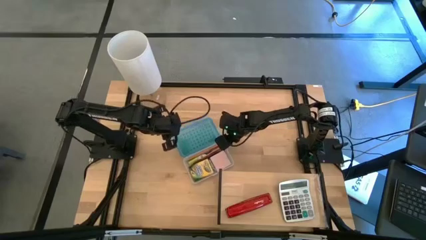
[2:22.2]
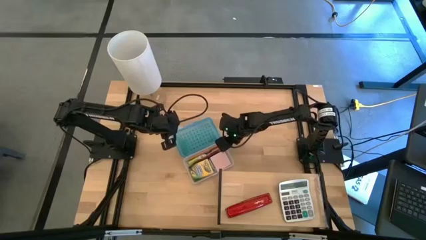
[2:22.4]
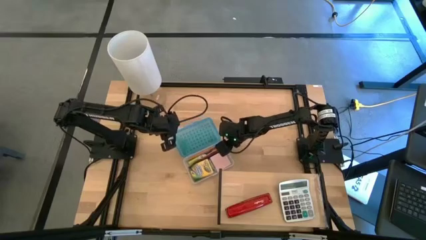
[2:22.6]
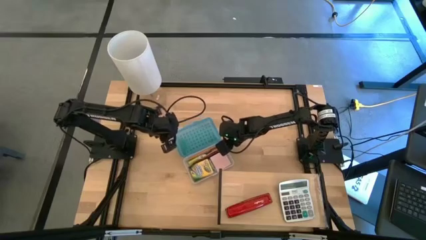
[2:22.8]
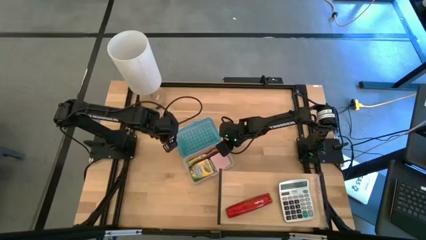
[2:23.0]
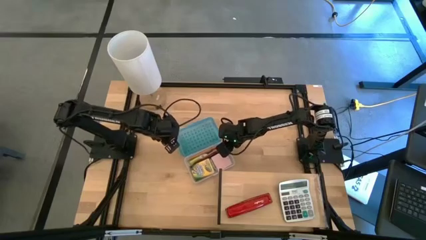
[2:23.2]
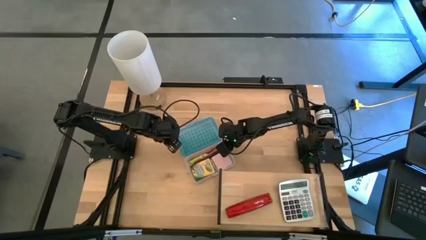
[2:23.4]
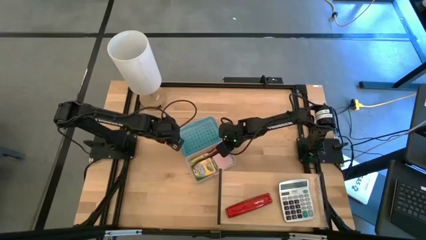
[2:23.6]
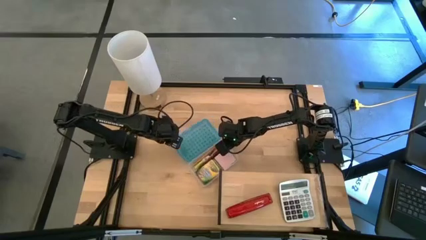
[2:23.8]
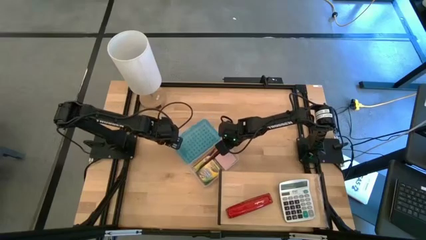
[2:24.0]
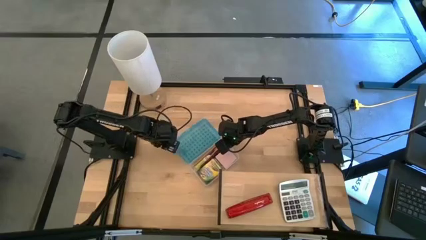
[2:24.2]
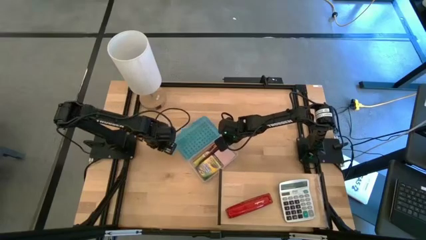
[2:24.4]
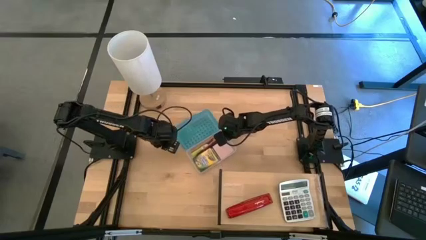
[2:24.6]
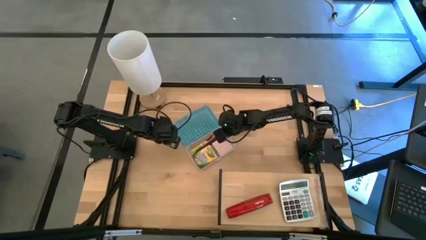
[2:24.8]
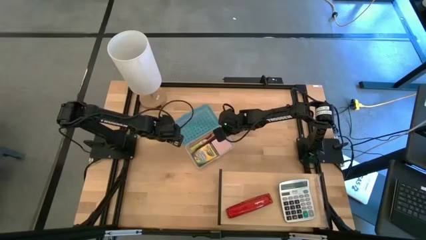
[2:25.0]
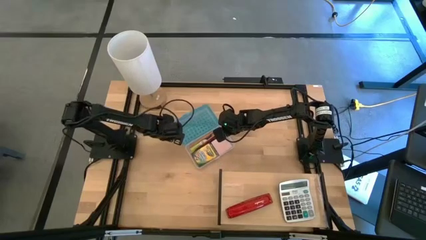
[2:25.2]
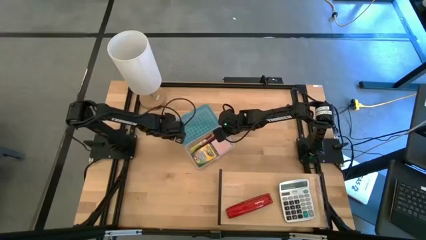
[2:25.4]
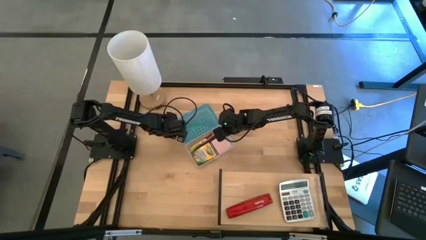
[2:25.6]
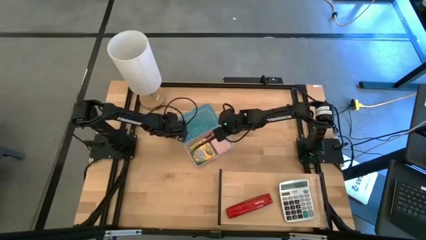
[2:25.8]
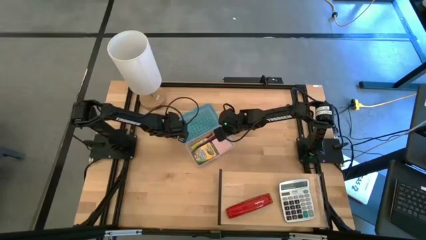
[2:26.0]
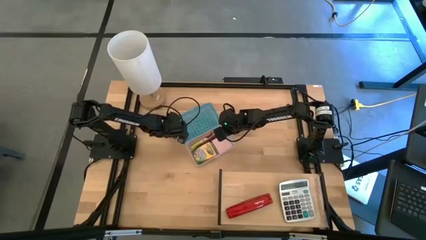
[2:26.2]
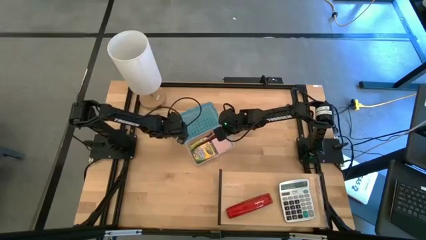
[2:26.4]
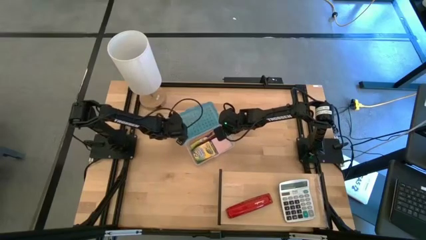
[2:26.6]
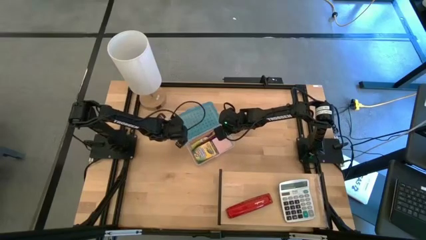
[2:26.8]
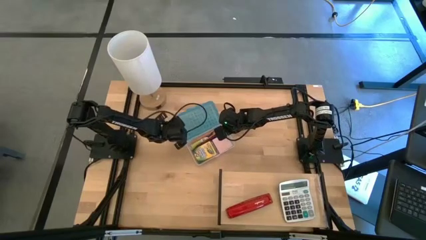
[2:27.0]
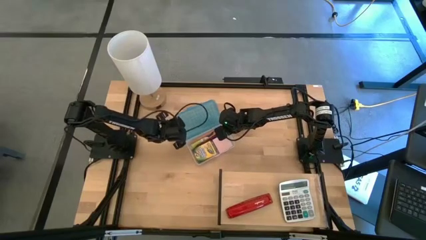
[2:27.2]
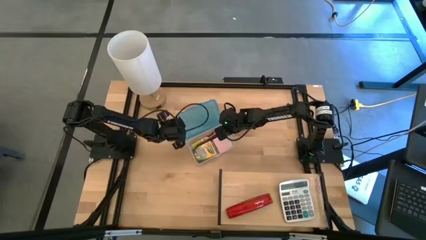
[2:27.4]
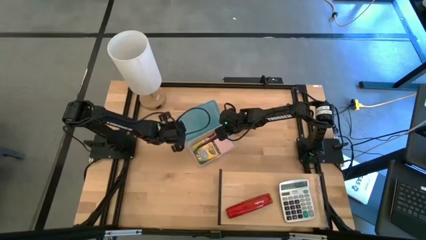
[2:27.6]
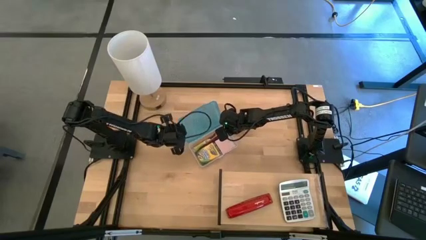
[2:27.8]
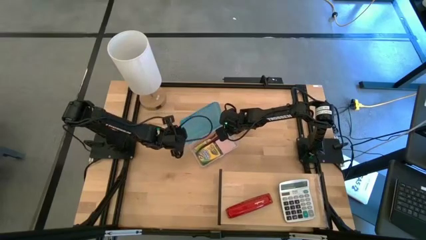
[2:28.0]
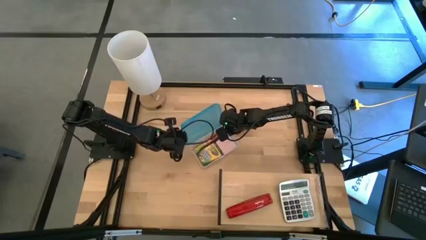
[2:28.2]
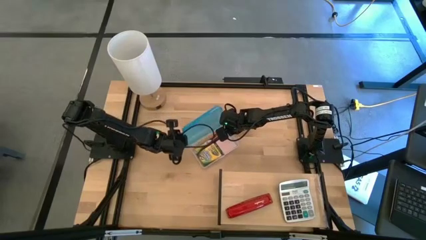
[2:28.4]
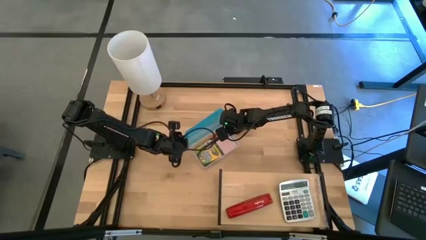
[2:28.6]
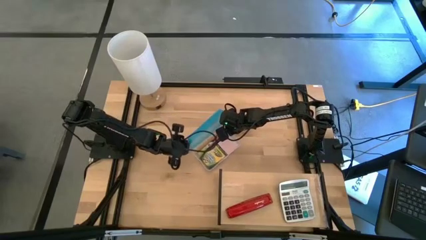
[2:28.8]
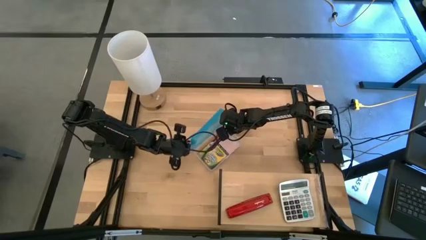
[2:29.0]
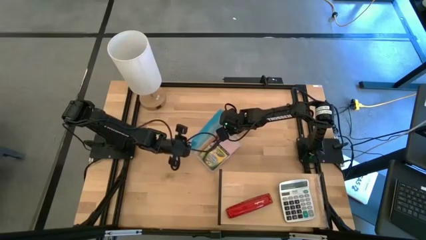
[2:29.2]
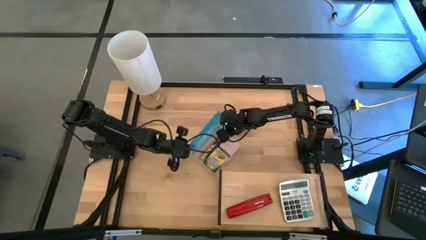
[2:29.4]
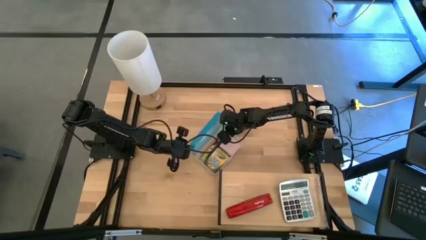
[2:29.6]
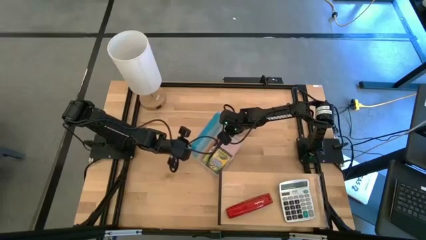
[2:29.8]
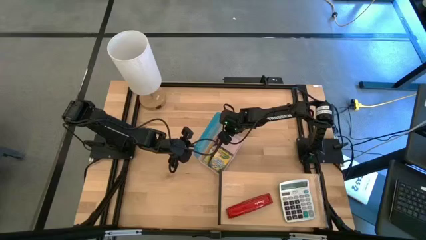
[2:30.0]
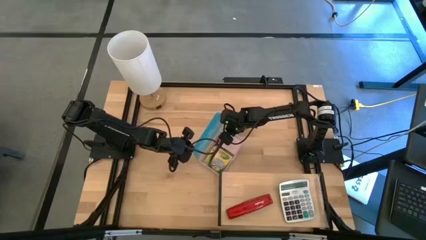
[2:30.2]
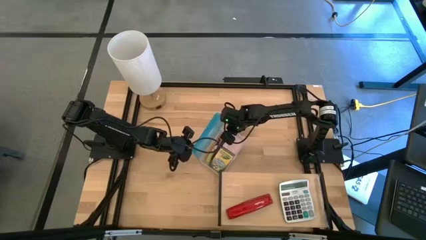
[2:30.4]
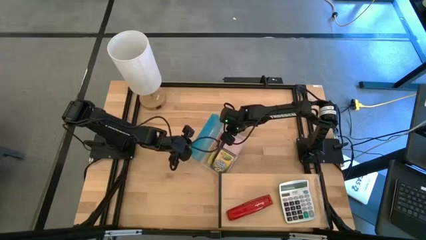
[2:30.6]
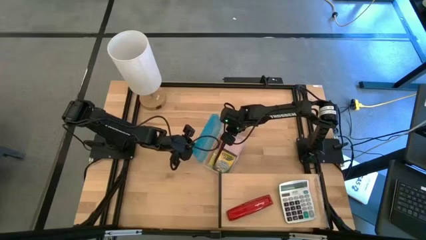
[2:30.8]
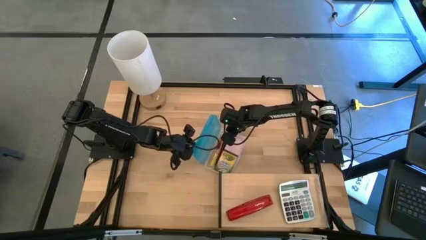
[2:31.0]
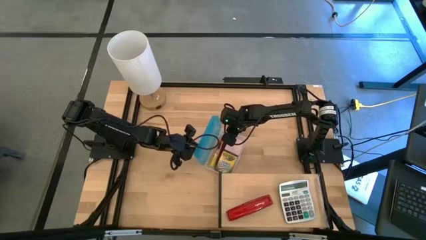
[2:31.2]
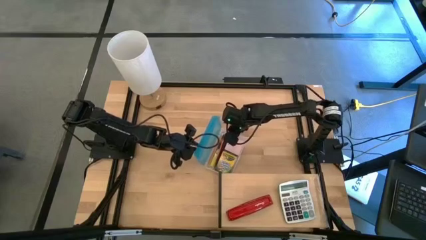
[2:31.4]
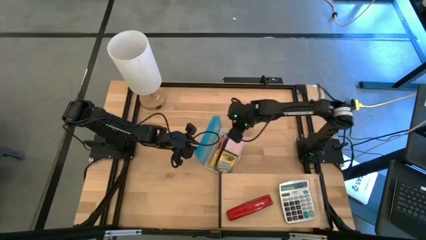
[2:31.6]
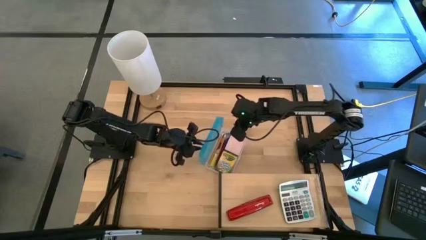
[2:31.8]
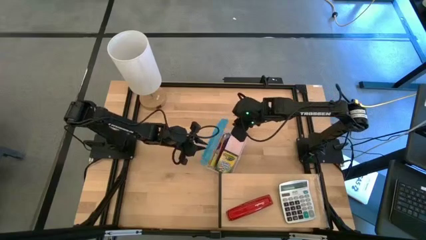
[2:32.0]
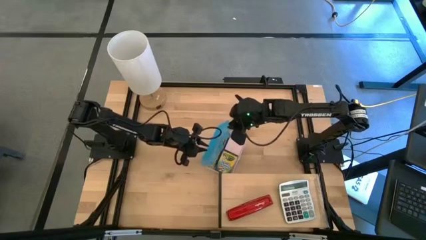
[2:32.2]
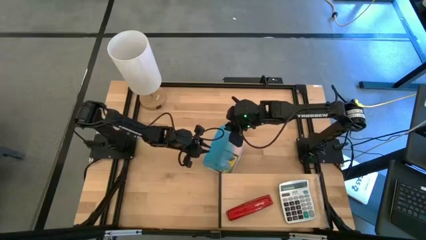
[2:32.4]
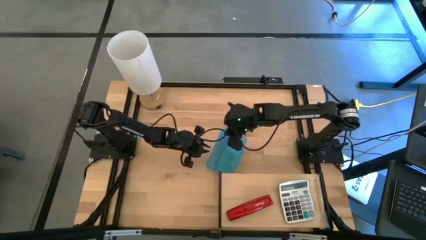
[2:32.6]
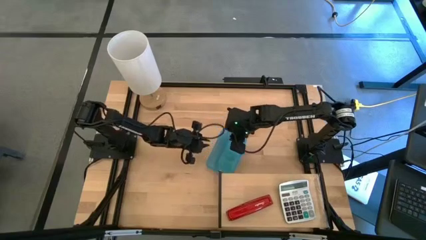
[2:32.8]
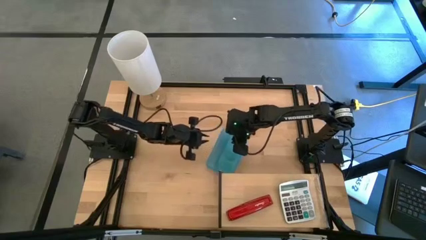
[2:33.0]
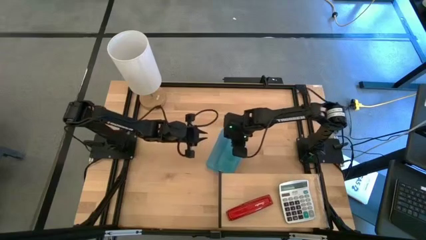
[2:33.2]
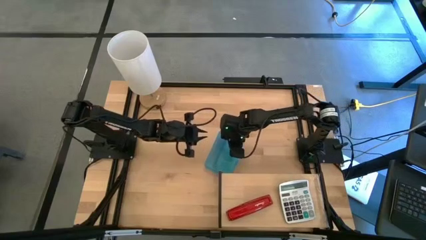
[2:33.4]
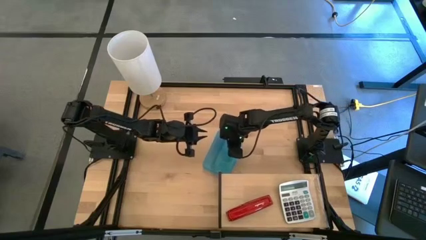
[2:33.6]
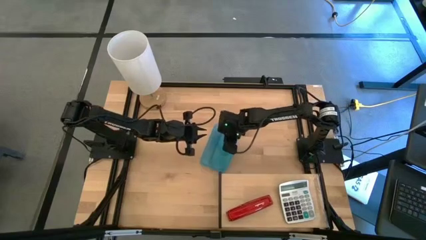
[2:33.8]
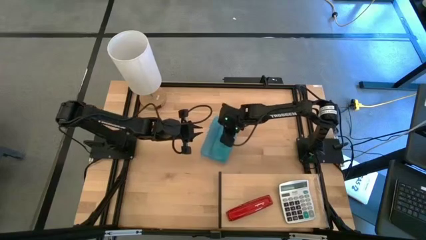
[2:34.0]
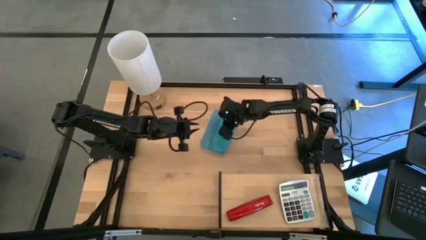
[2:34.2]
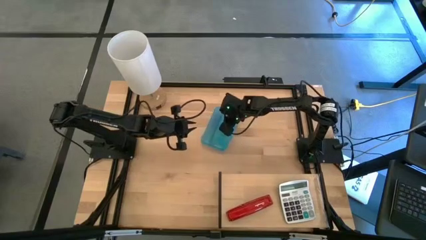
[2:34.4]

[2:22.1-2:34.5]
Task: Pack school essentials
Close the blue supply box

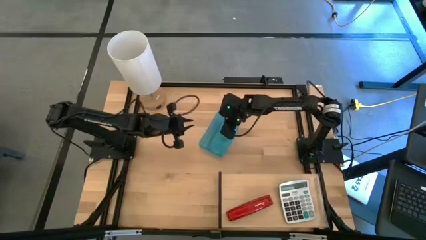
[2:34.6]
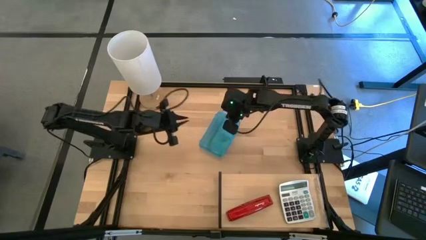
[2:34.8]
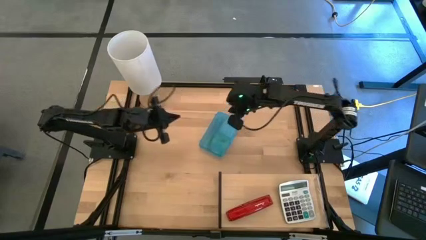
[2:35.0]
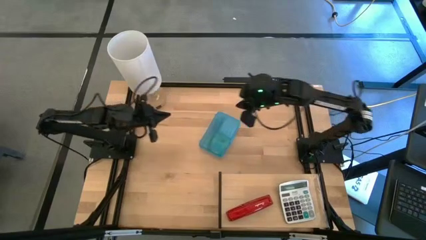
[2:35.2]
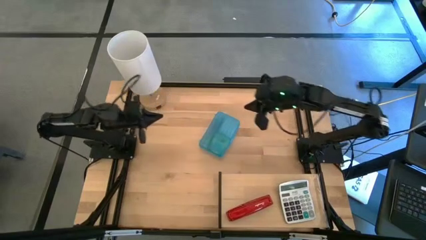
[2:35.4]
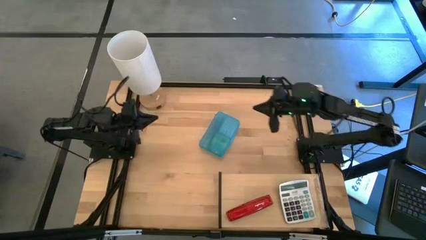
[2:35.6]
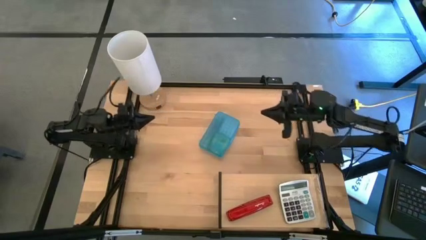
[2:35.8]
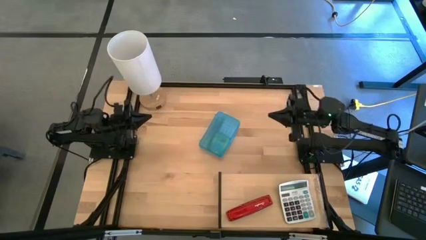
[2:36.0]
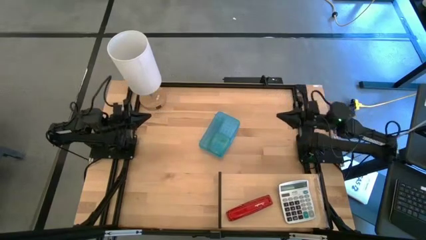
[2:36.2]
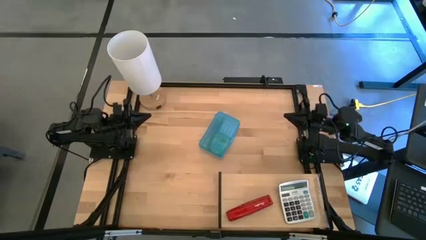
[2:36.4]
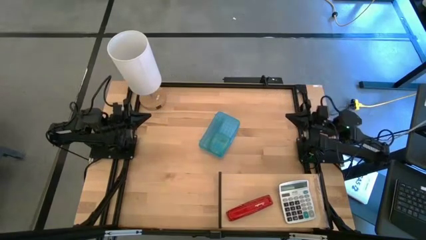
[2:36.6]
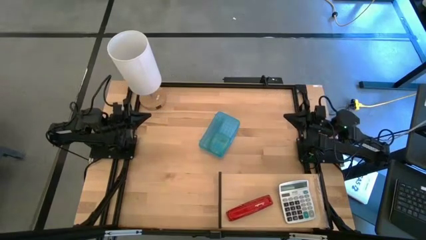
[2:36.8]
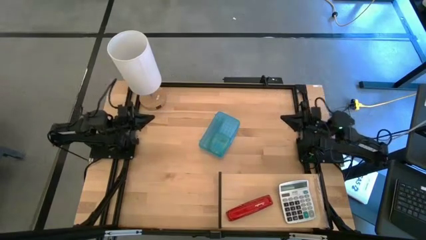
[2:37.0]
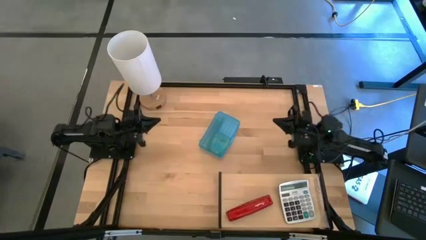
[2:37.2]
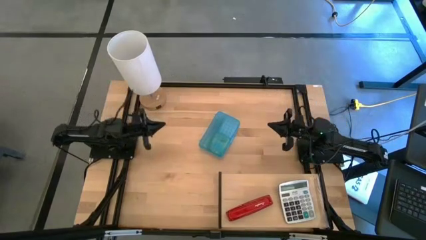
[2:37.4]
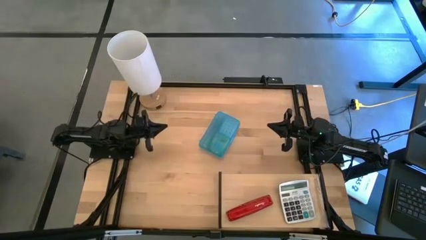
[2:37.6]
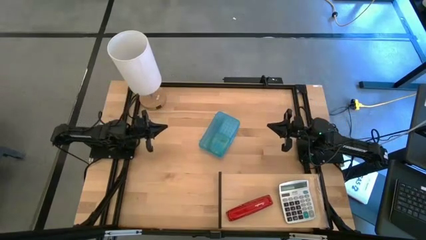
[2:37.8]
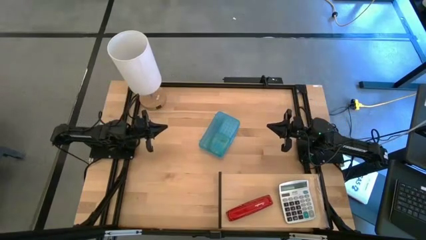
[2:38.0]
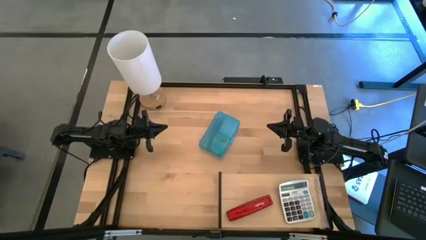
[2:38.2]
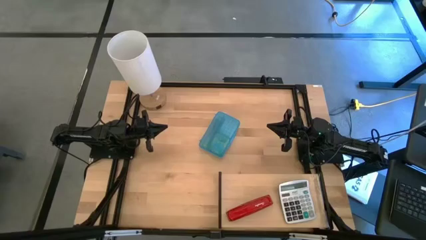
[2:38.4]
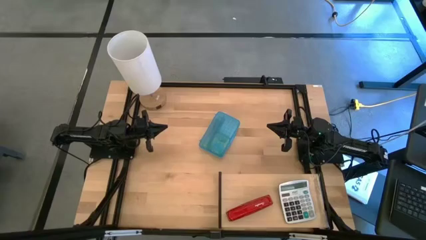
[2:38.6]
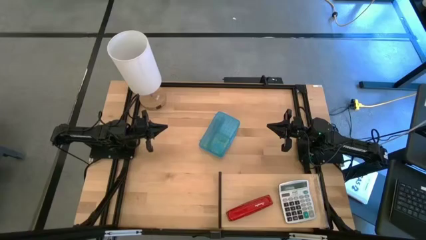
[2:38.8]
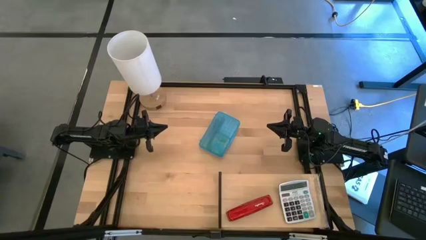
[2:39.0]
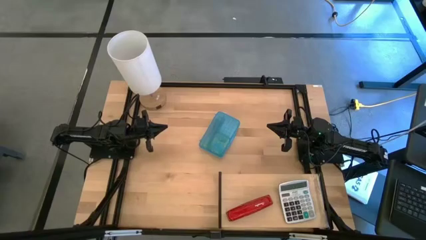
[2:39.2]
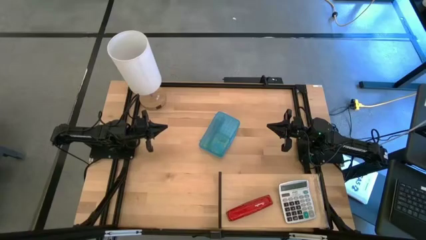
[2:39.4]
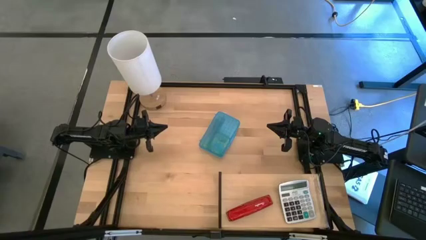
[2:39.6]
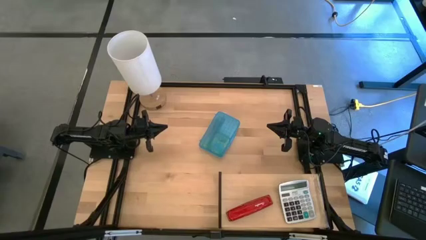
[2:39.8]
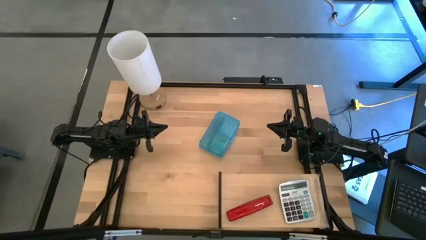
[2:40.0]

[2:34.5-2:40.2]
Return to home position
